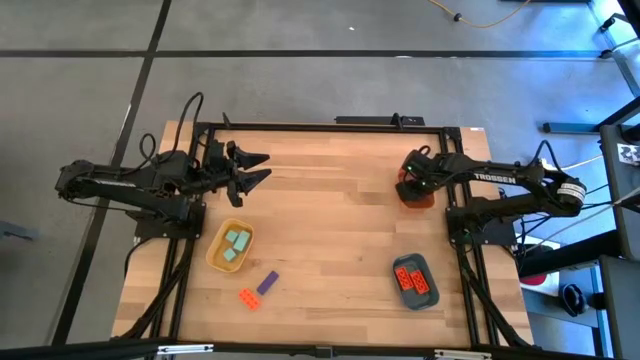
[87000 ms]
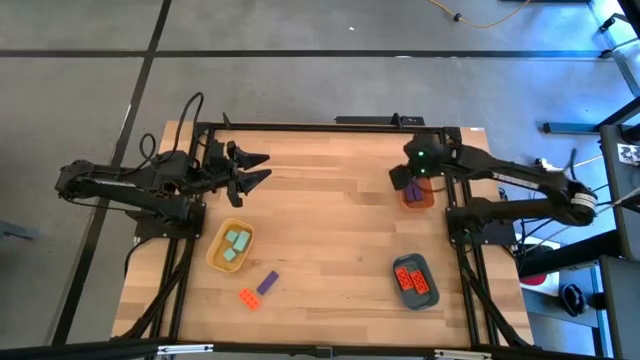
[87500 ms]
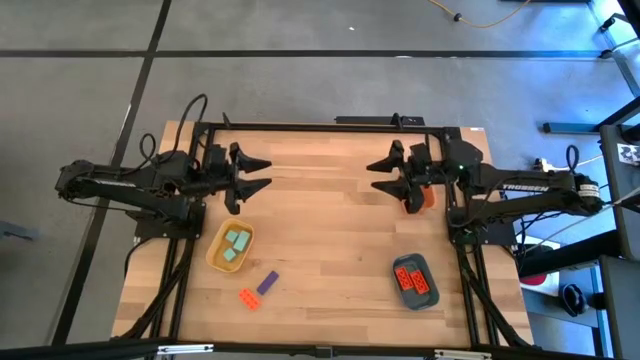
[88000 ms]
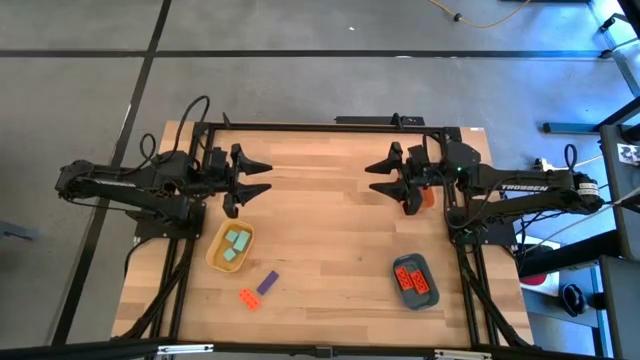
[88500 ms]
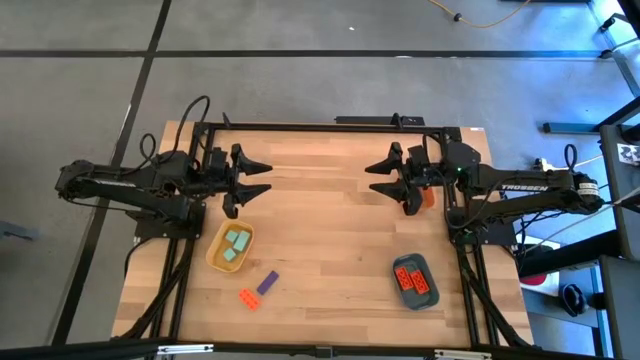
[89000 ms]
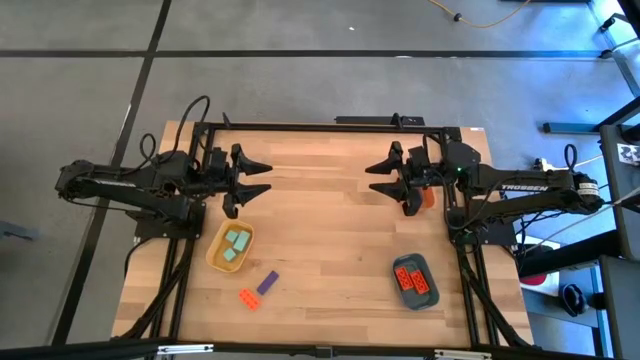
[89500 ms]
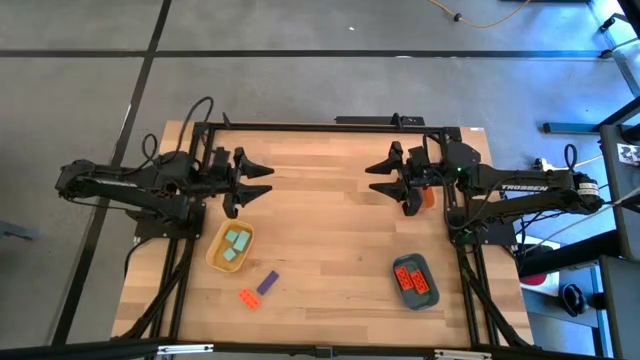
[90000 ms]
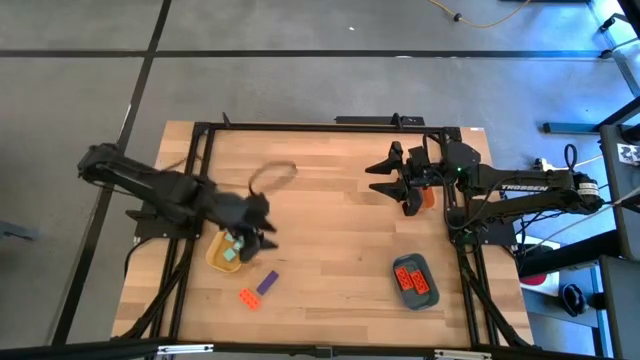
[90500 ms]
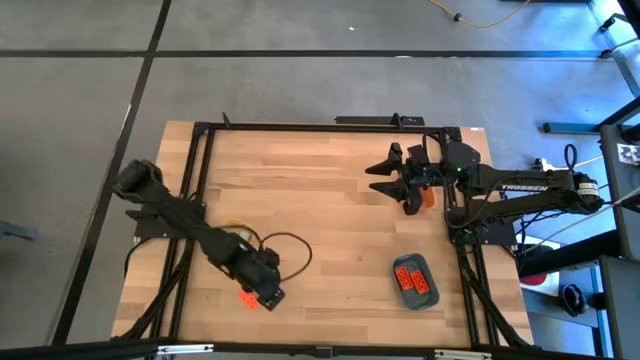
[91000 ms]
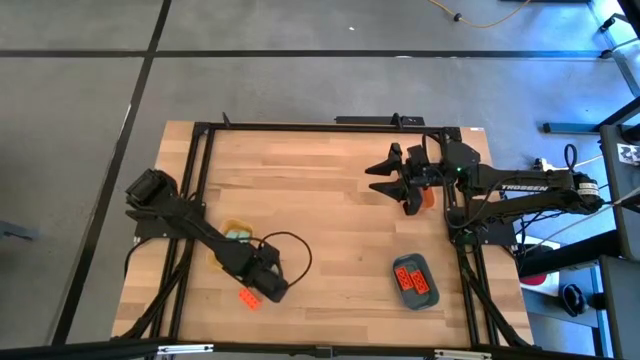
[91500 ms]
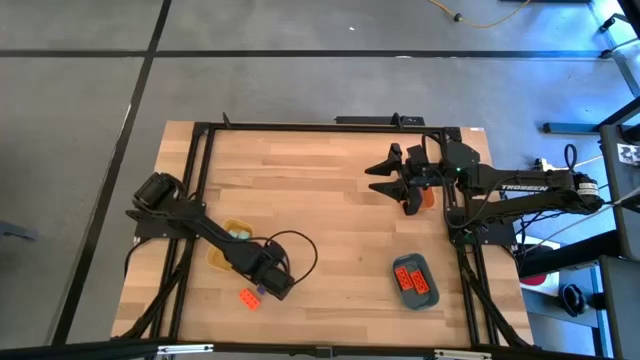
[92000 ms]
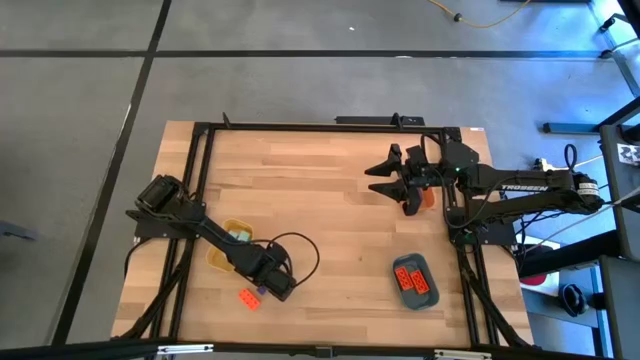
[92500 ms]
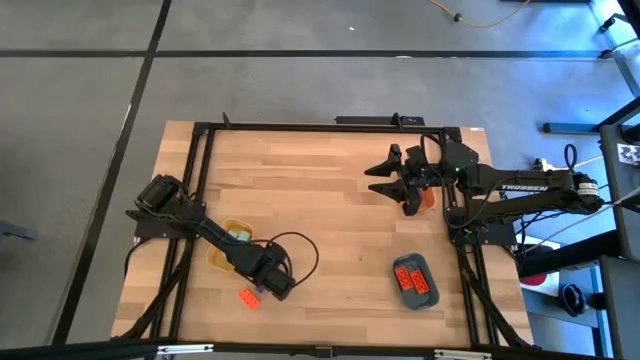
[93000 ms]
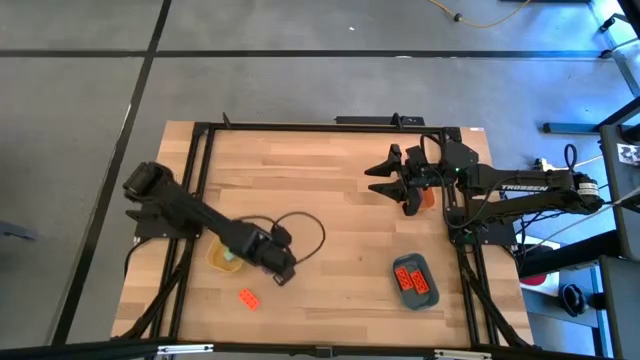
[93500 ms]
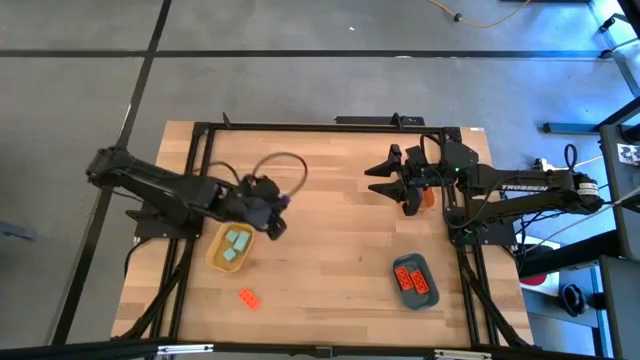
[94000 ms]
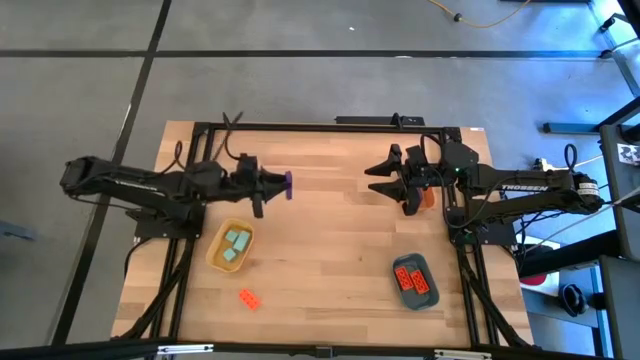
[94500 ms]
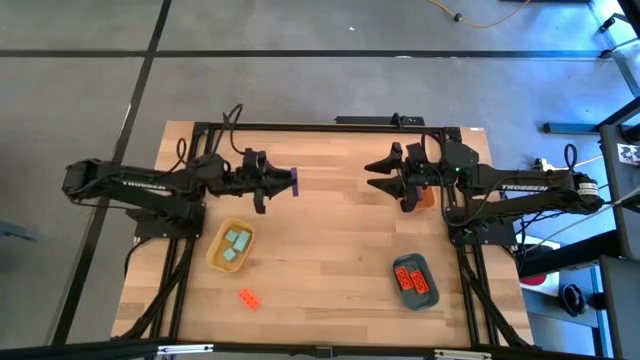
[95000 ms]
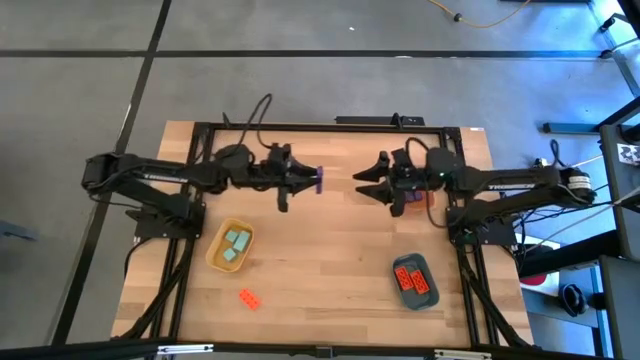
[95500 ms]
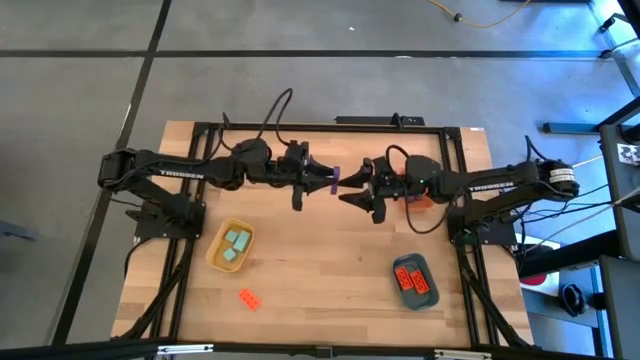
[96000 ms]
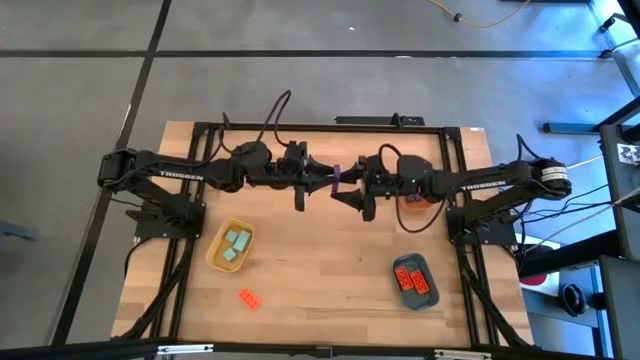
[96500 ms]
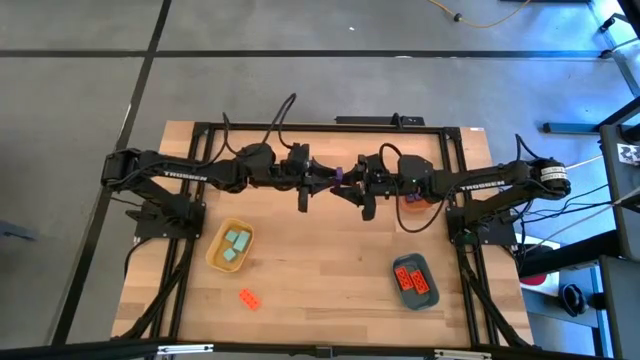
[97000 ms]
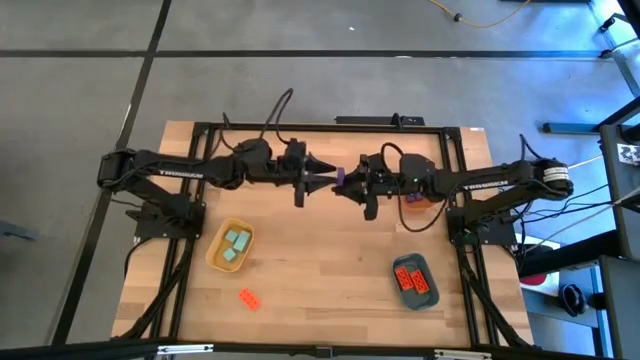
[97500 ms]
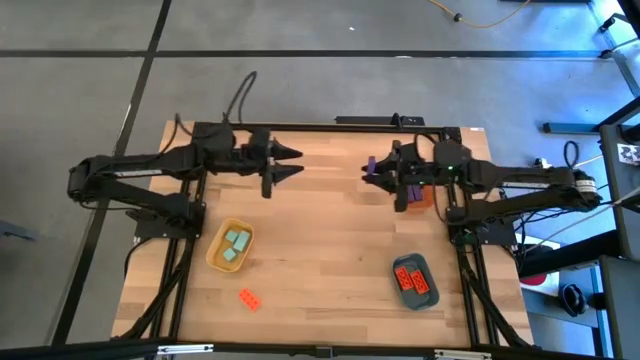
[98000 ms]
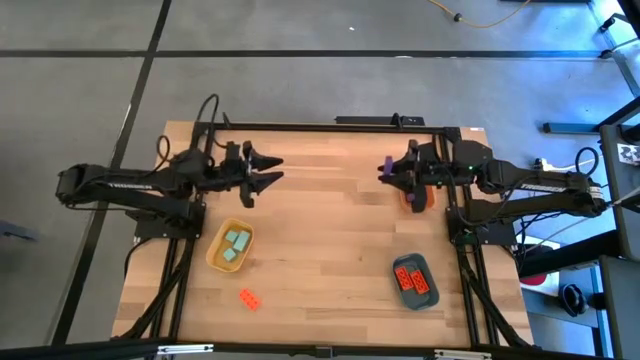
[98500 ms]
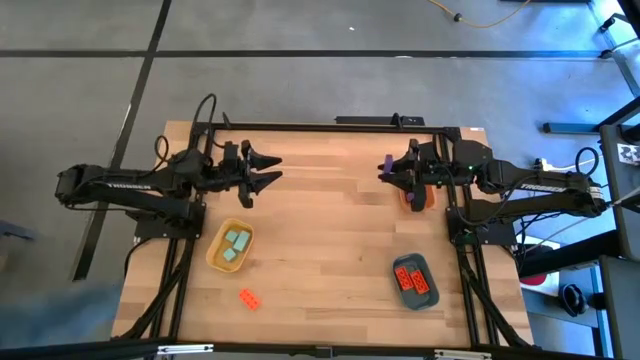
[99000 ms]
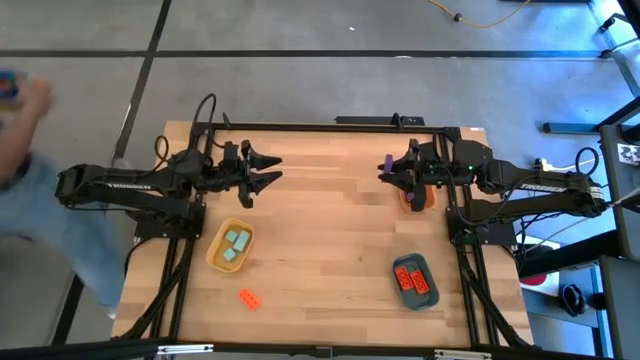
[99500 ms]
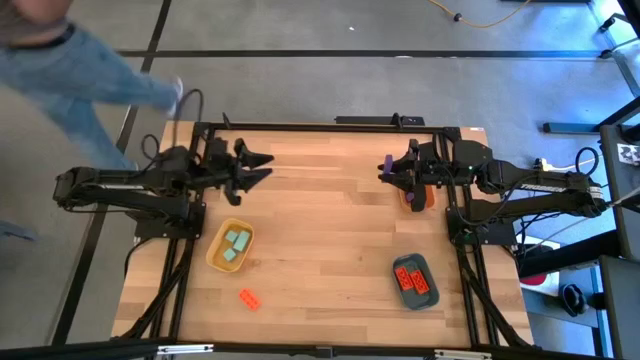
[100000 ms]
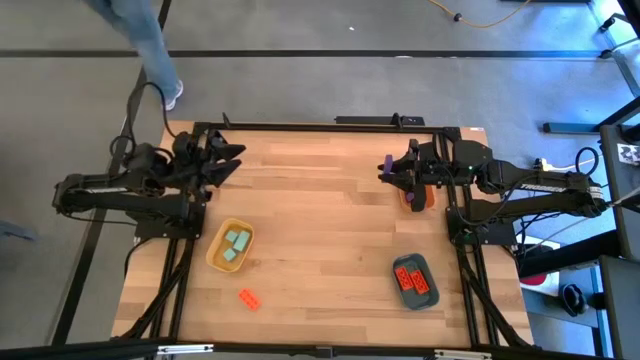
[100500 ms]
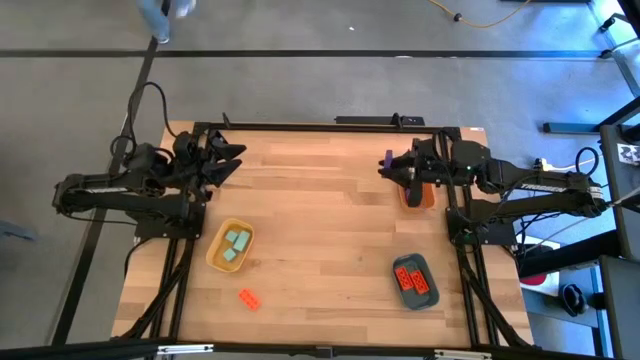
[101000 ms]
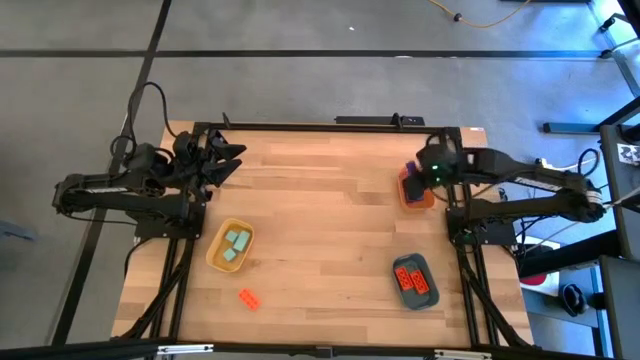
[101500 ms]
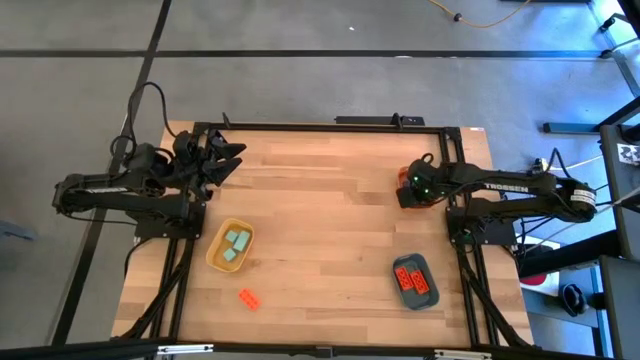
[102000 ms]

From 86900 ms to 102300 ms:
Task: Sort & place blocks by color
Put the purple block into the orange bin

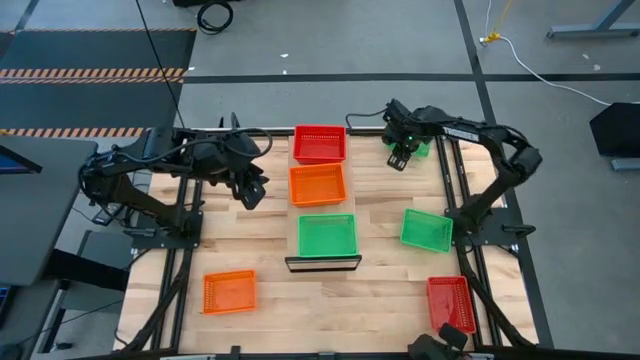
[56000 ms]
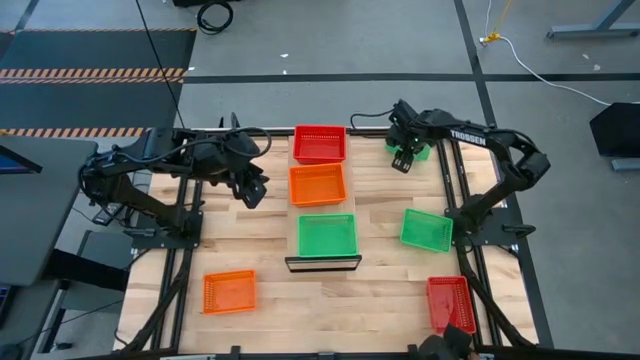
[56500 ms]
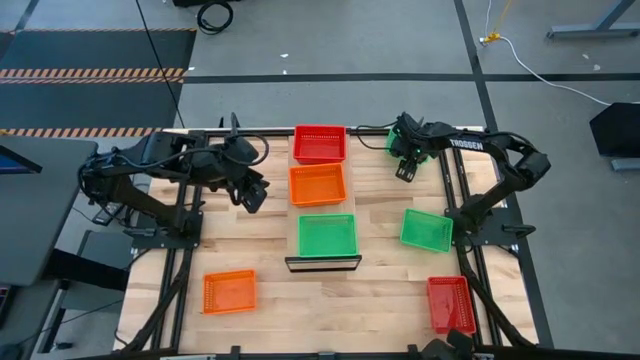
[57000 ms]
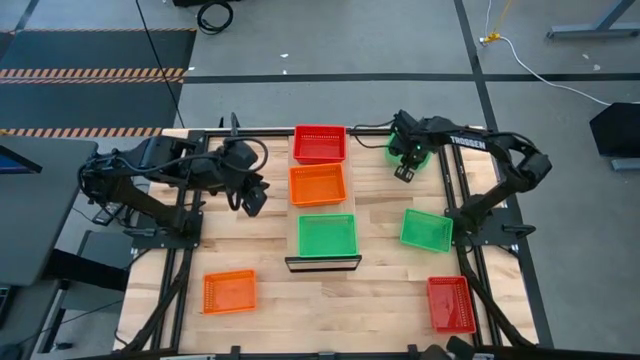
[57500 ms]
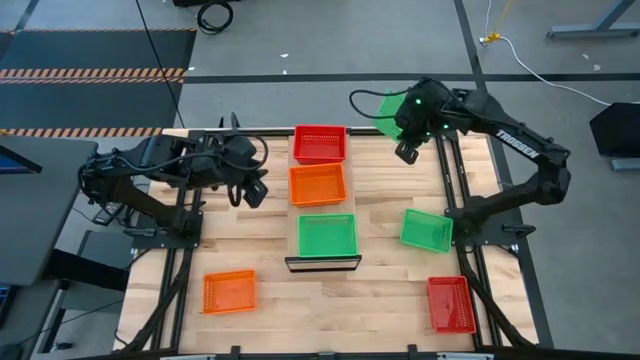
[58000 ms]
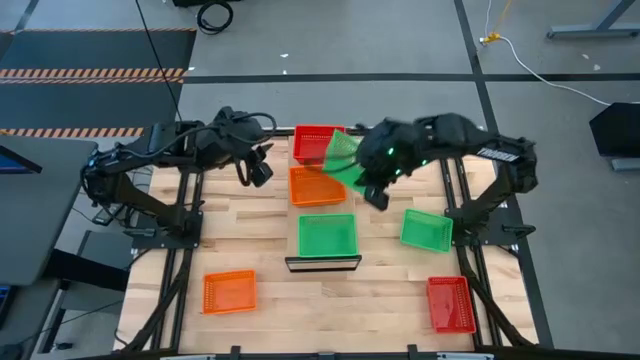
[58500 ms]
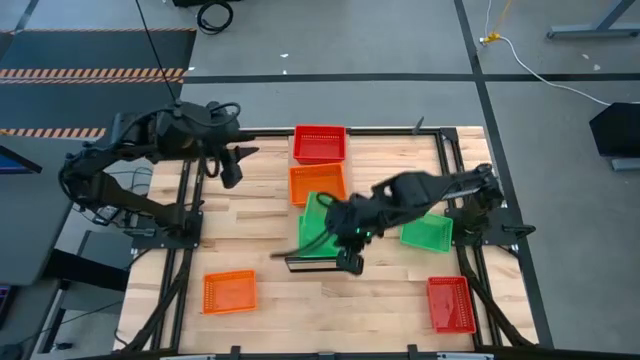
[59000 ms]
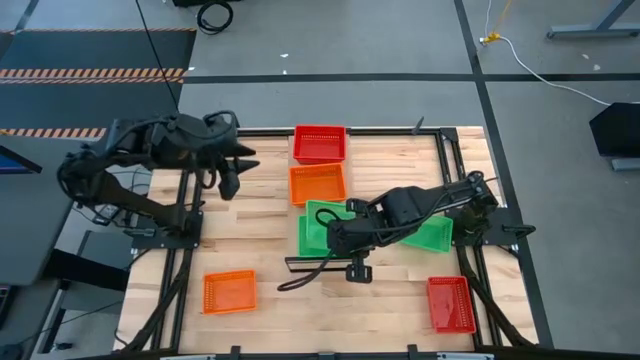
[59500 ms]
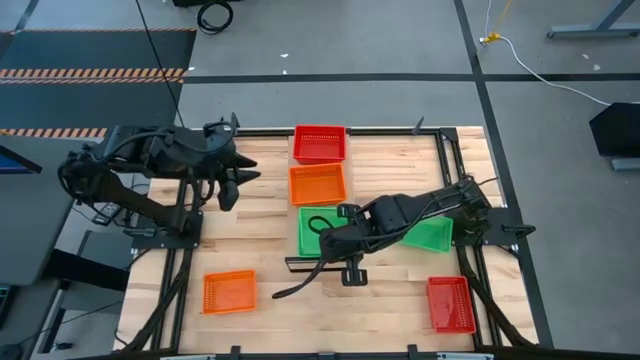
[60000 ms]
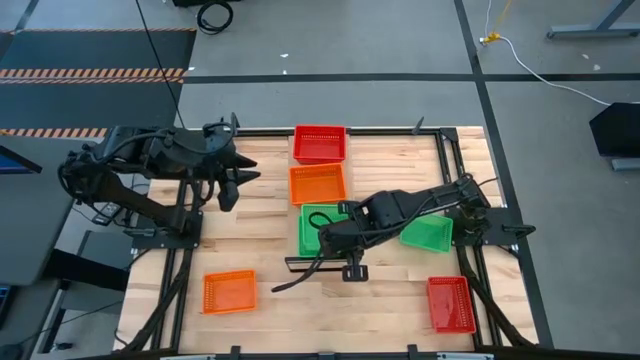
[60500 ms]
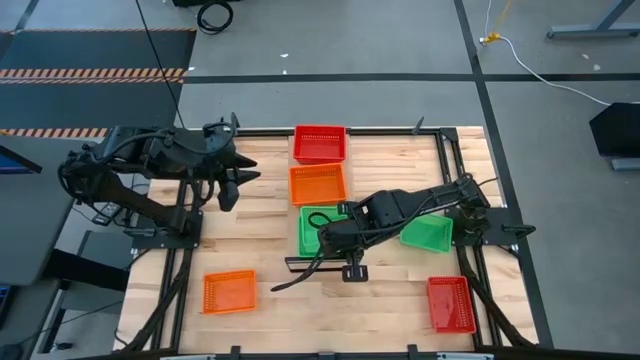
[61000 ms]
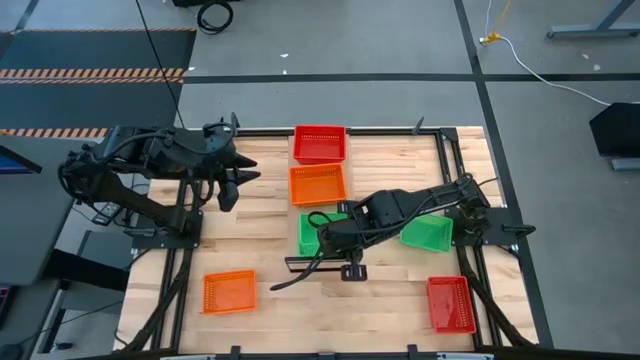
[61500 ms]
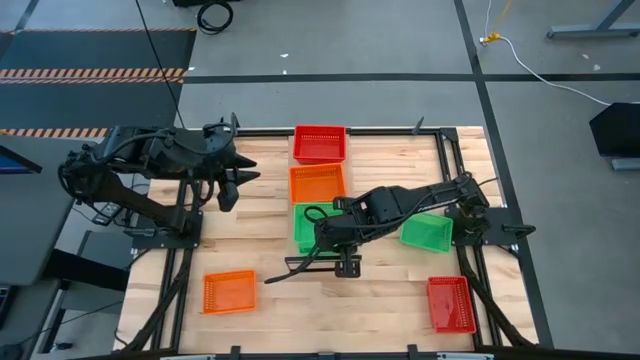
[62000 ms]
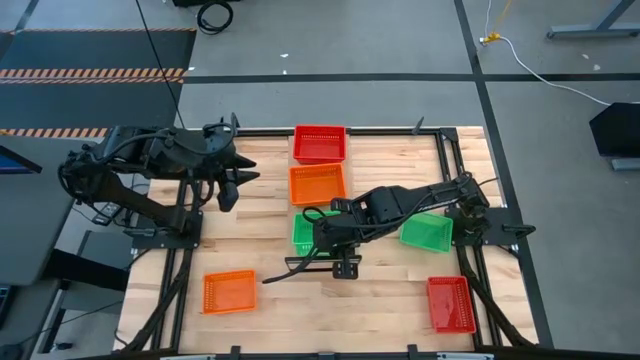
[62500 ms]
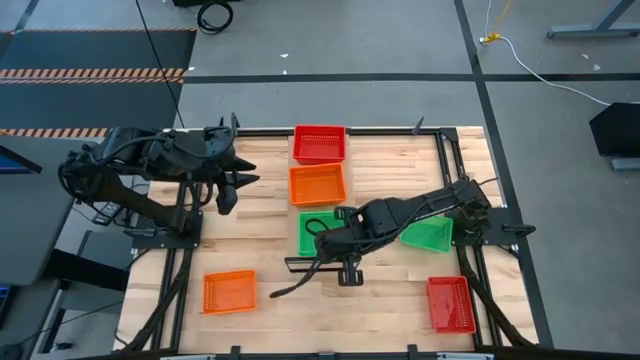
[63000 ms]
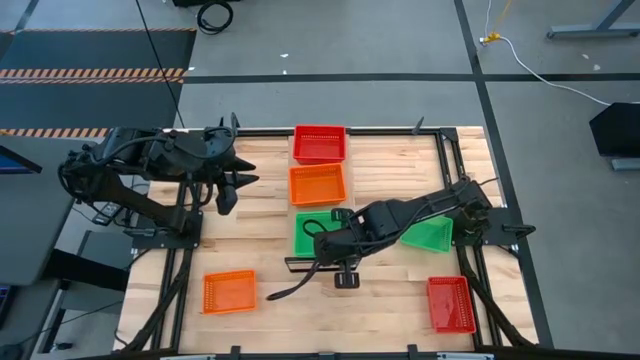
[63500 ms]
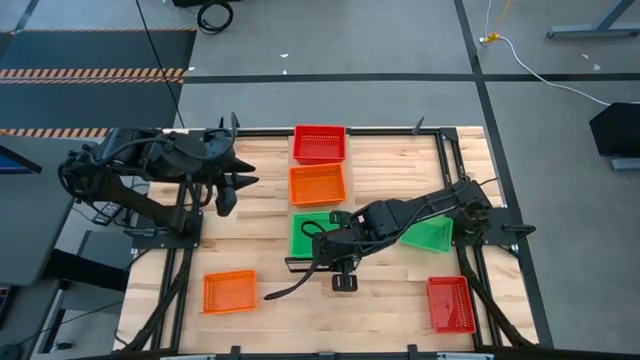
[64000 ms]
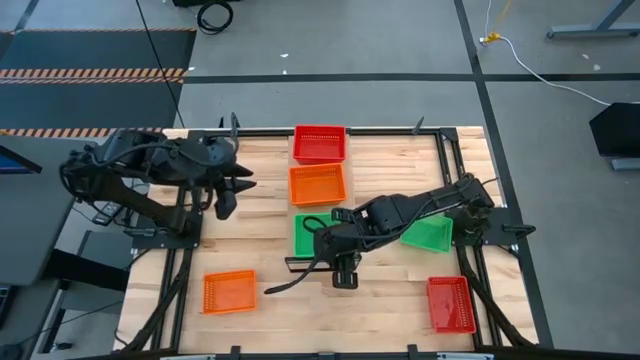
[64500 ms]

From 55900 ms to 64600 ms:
Task: Stack baskets on shelf by color
Stack the top green basket on top of the green basket on the shelf
